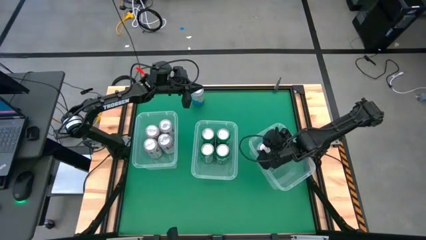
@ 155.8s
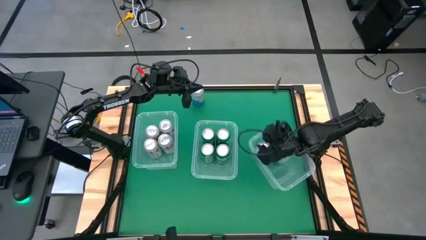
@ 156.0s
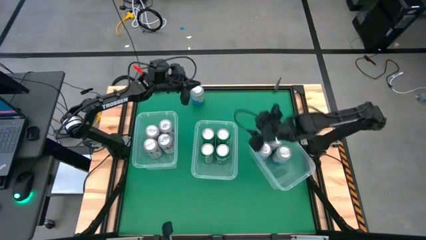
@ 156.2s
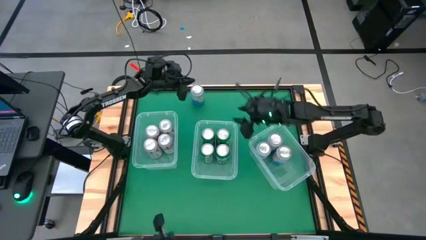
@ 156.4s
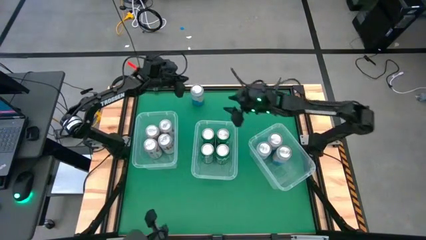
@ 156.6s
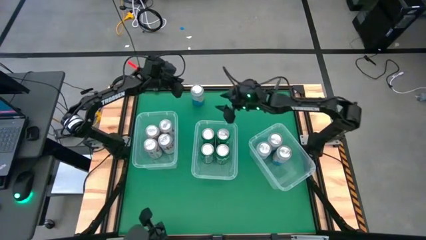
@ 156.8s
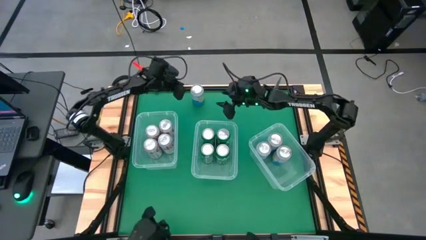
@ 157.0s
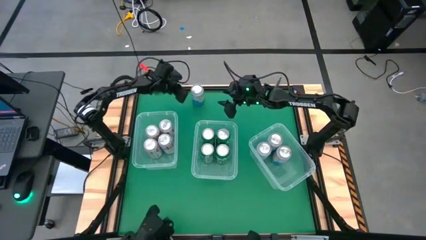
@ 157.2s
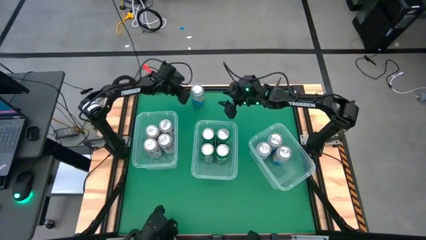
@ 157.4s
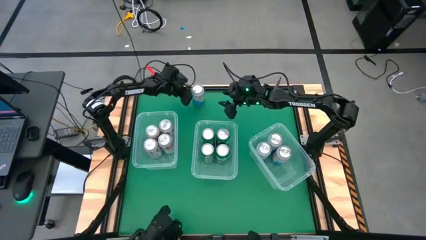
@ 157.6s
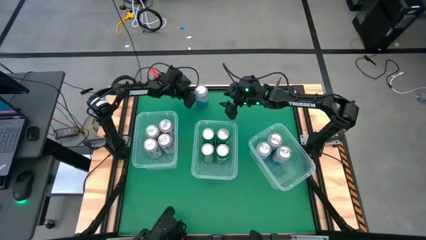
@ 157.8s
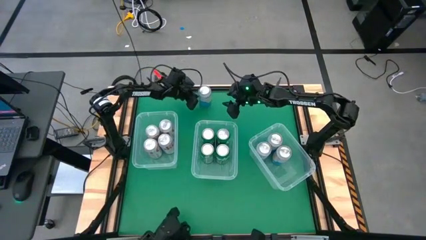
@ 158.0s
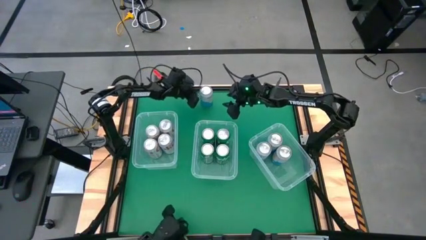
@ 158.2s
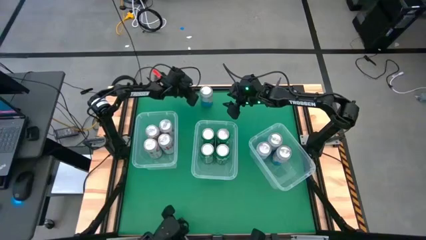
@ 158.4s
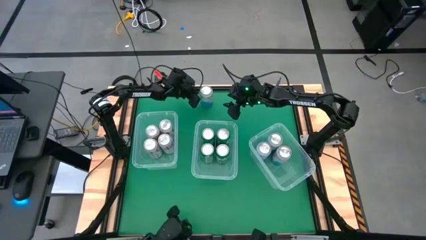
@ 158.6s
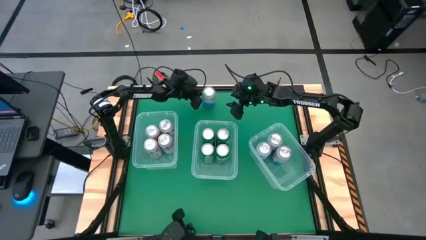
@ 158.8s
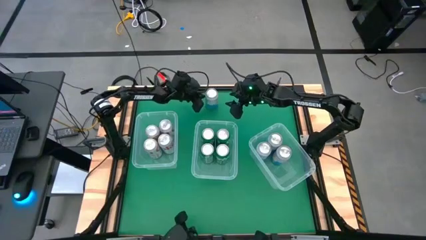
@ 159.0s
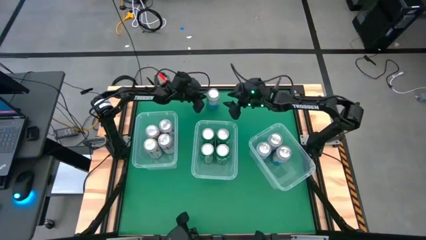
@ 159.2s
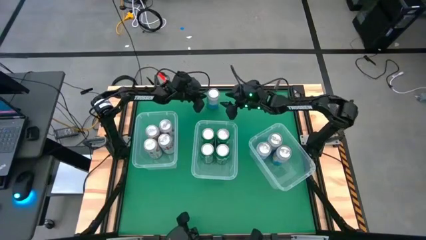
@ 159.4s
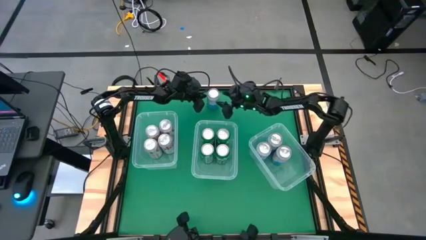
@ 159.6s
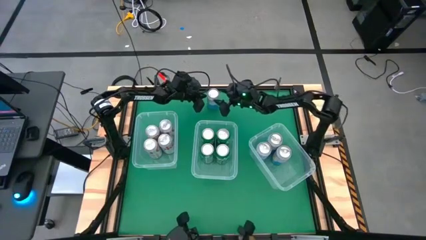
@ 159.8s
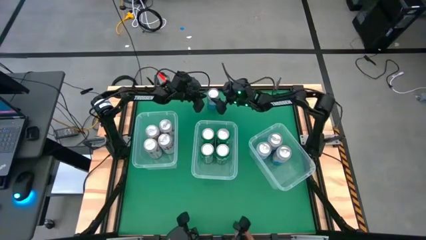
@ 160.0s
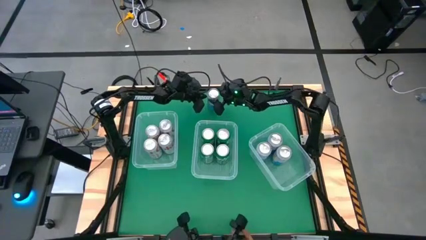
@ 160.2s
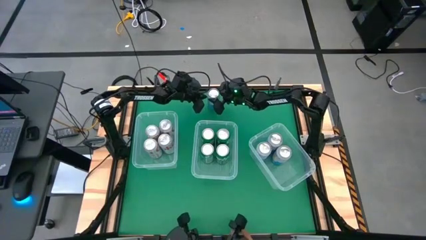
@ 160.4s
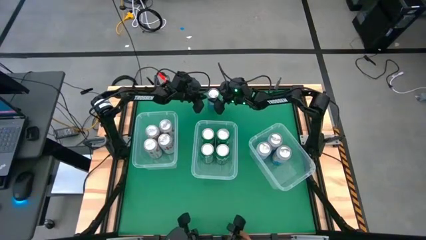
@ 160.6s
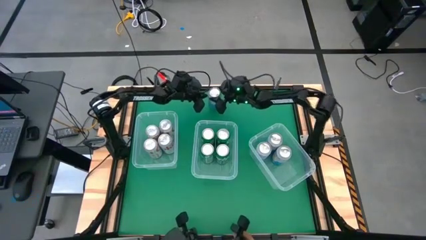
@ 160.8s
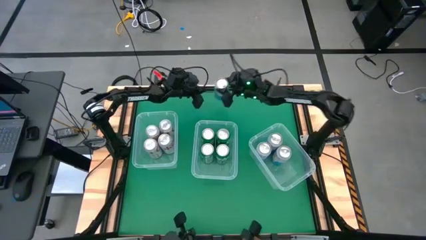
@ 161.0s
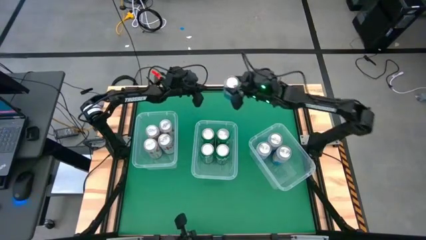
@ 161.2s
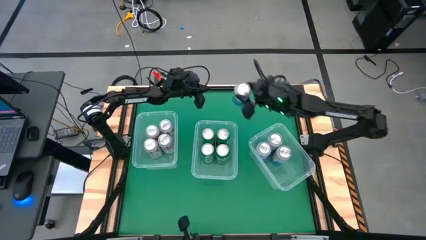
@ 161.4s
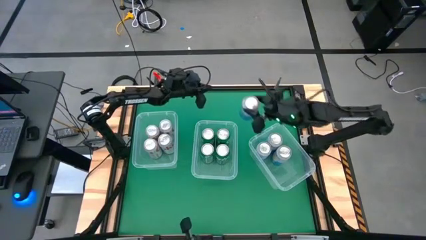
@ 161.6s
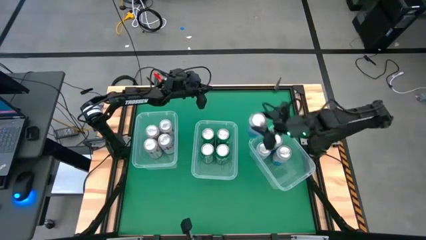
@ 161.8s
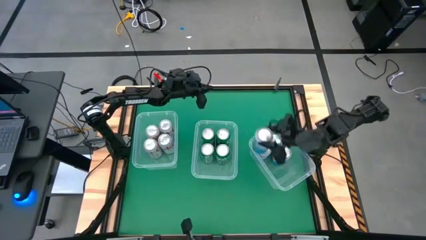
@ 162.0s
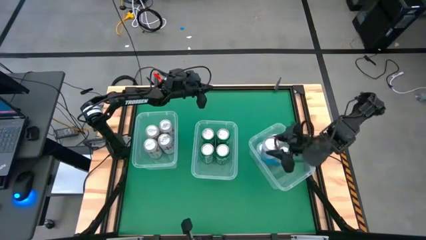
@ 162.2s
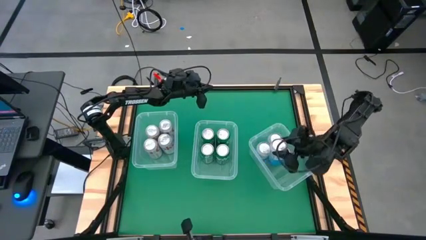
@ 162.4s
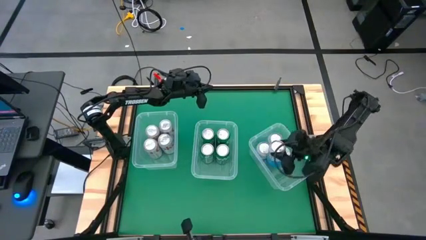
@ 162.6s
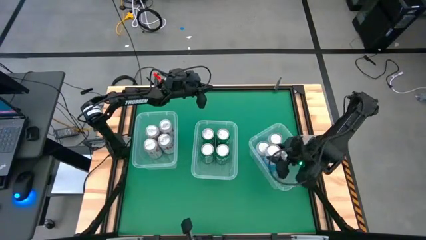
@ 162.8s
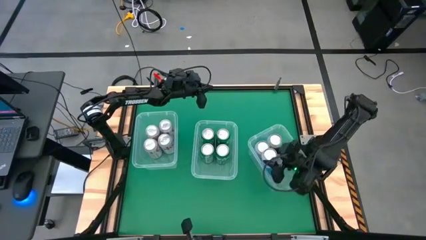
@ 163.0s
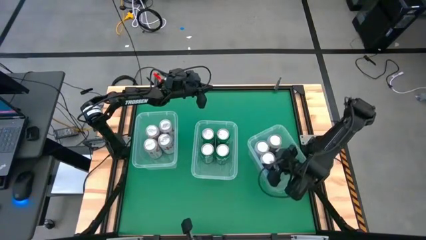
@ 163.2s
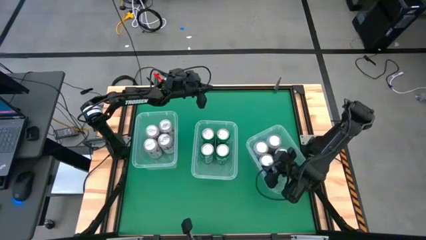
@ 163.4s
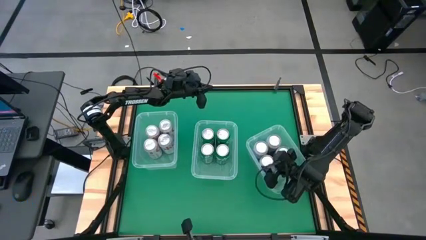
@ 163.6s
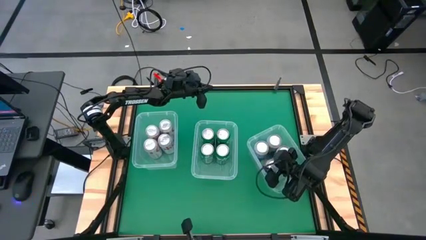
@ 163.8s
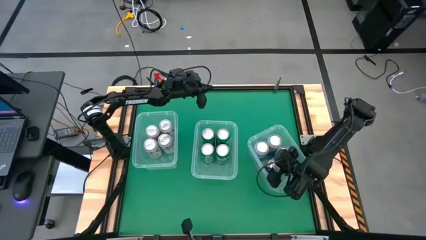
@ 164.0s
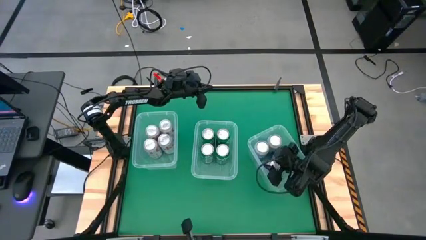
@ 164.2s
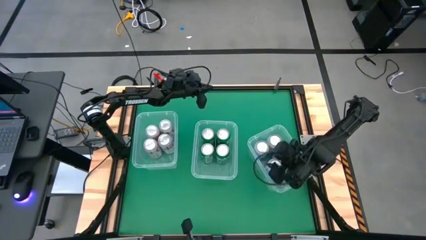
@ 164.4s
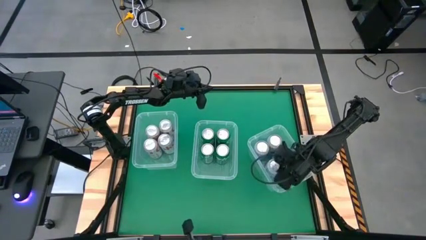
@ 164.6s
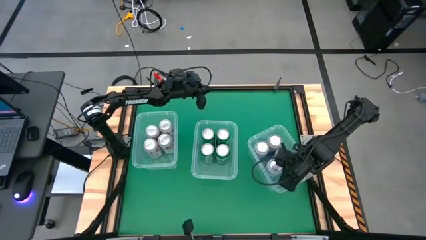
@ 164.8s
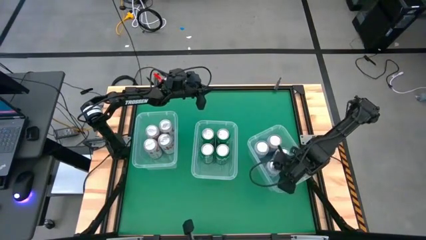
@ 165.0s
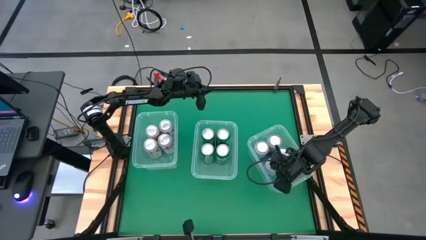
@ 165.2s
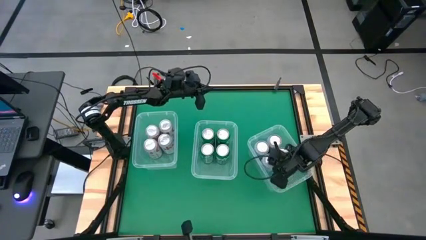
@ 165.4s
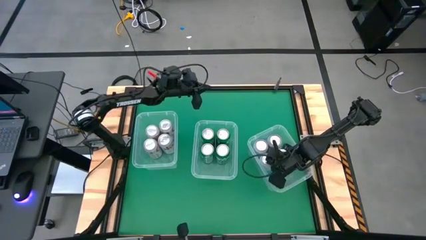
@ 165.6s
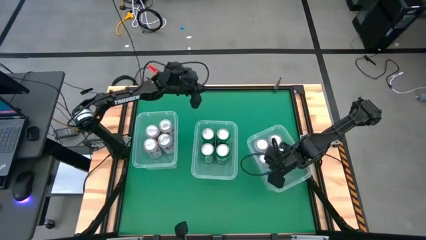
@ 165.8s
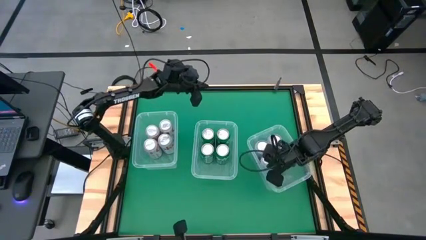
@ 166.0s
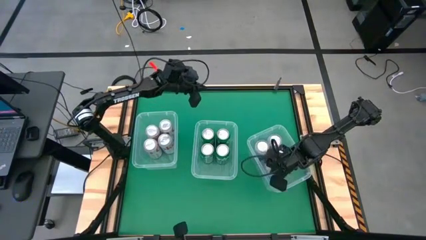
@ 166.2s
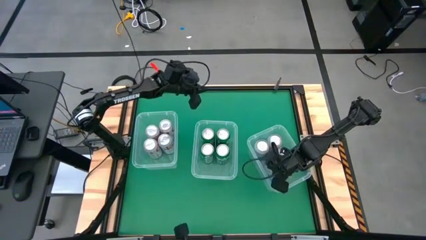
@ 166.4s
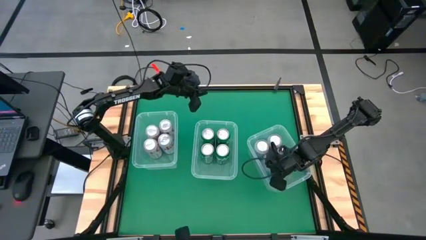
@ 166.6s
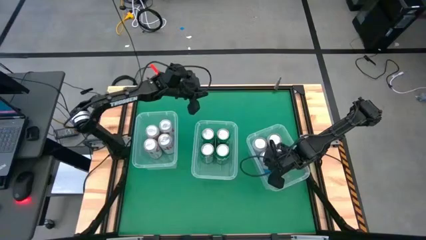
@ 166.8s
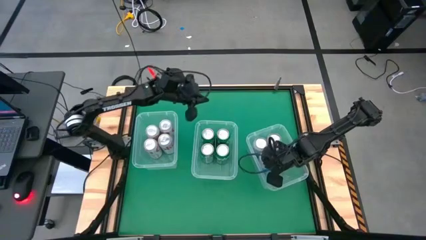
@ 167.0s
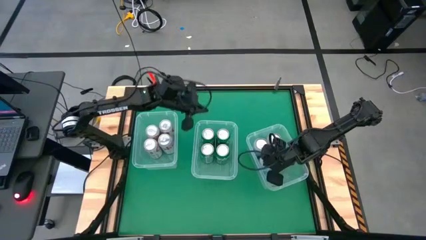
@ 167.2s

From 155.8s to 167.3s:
Task: Sort soda cans
Put the blue soda can into the button right bin

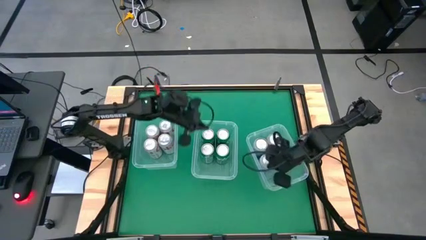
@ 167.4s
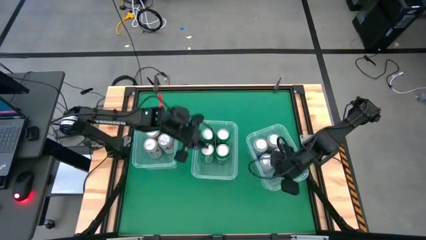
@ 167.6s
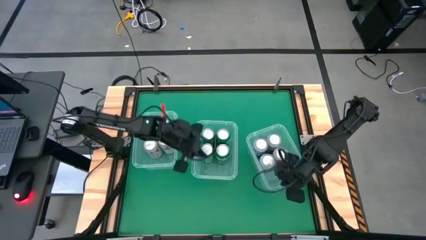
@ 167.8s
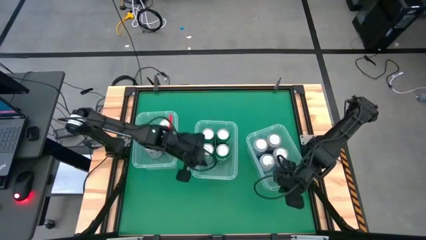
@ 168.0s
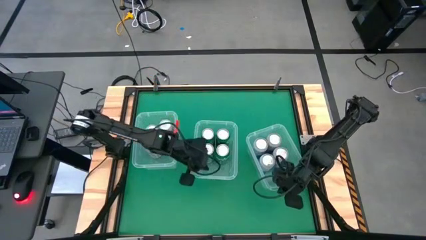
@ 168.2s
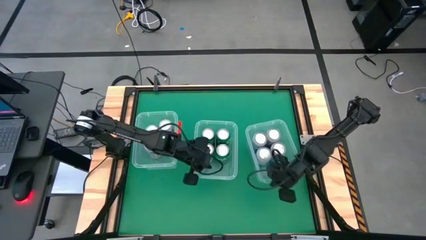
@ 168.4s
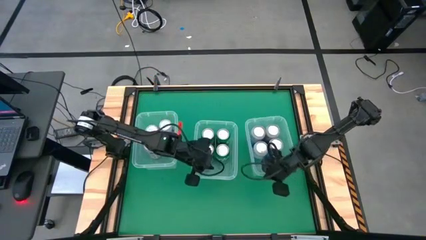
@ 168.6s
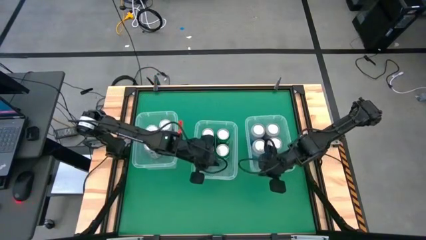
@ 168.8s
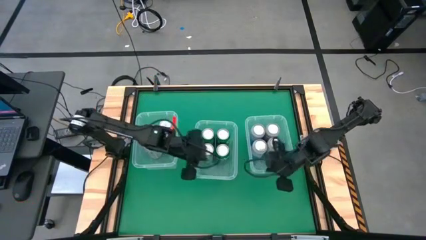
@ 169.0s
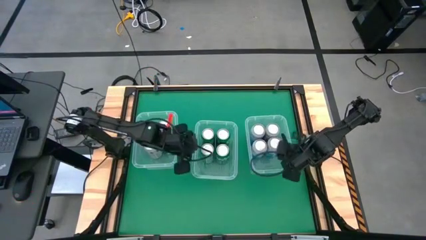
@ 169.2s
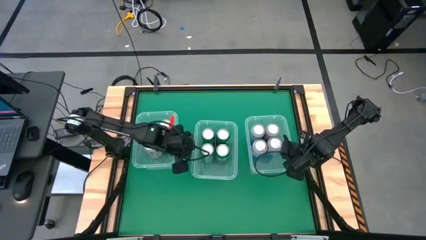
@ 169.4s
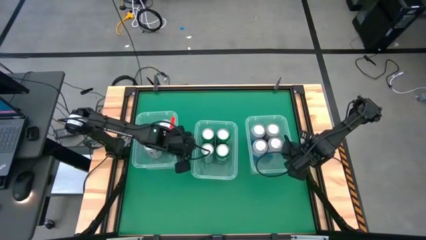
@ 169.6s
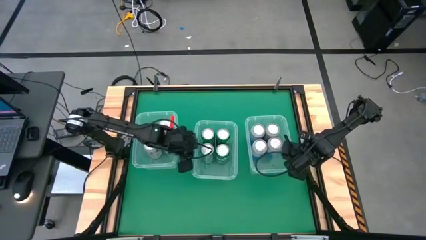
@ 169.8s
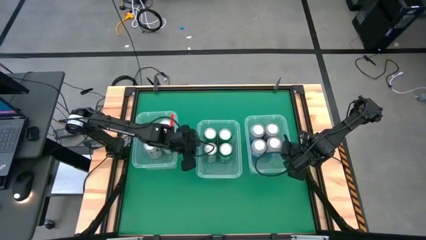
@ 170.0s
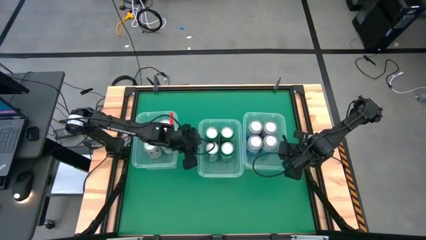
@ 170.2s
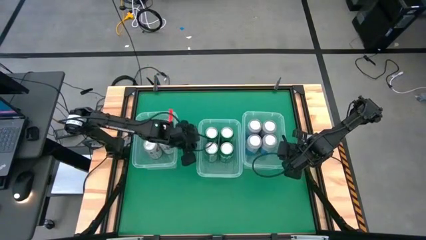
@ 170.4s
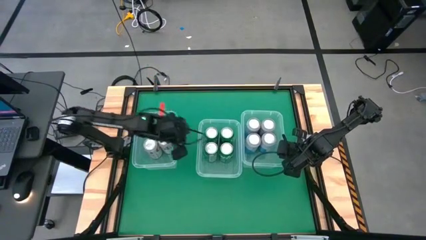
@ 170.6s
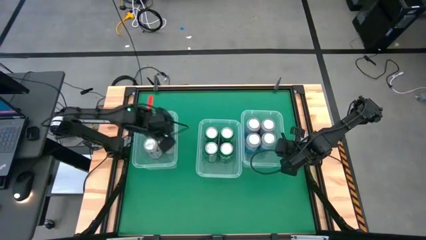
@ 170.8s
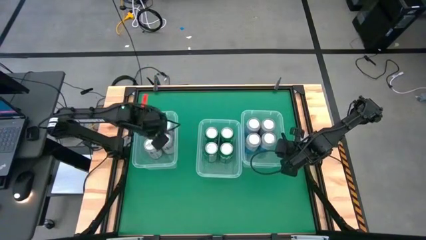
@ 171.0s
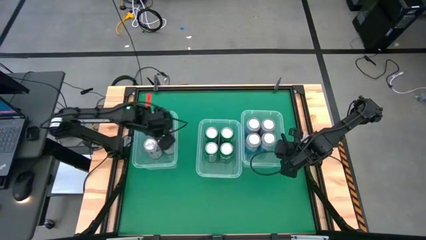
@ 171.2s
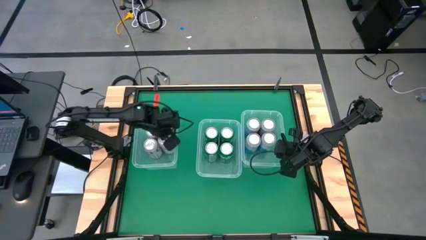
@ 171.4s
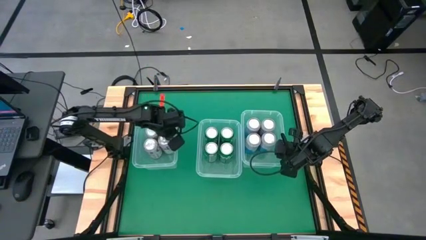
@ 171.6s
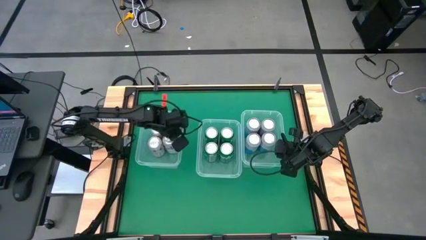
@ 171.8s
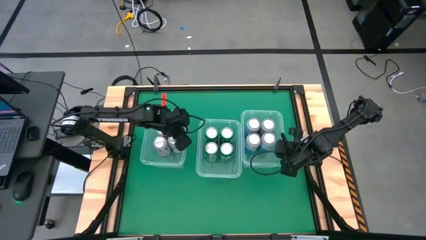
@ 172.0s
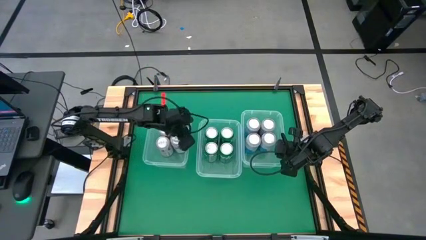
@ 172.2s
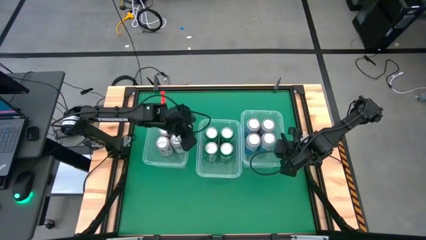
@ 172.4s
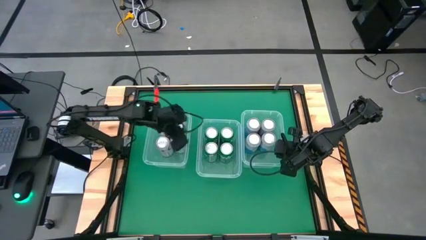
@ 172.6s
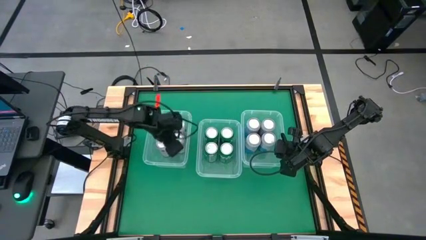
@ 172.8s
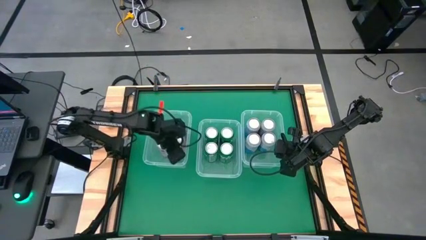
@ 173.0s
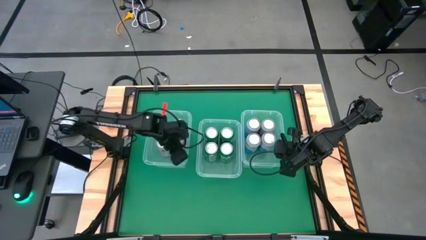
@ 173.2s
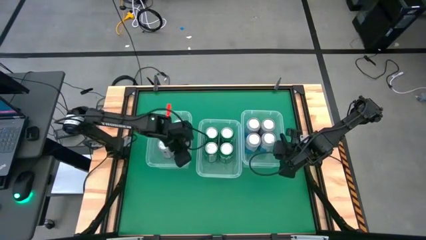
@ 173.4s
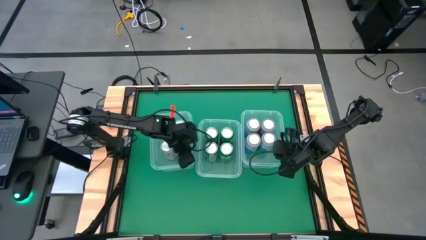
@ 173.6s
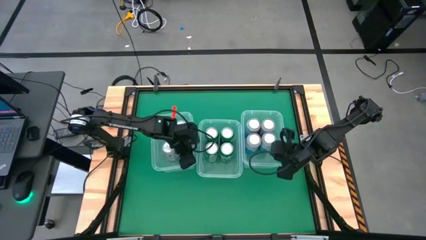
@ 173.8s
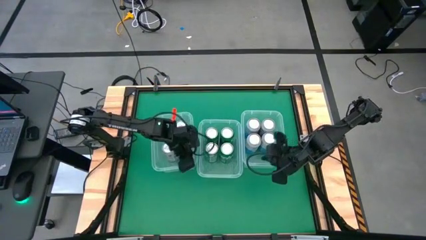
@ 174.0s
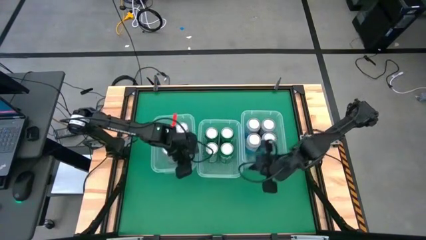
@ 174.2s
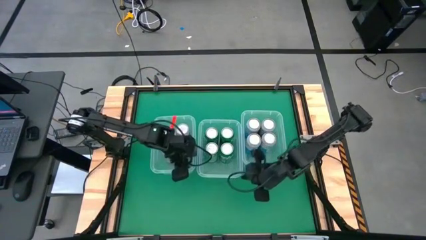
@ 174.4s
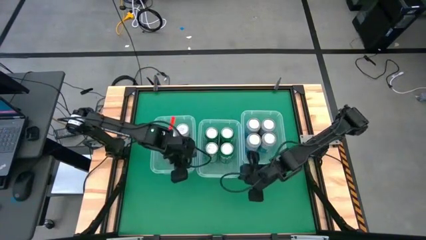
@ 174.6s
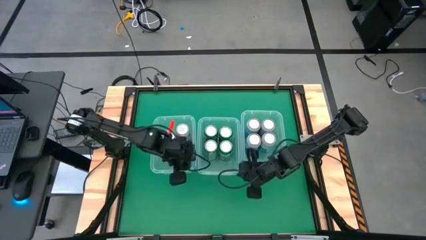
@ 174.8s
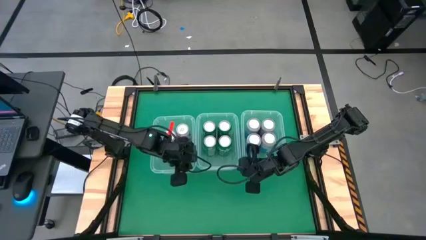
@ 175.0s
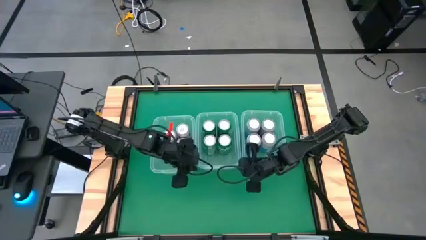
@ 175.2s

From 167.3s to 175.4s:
Adjust the bins on the shelf
